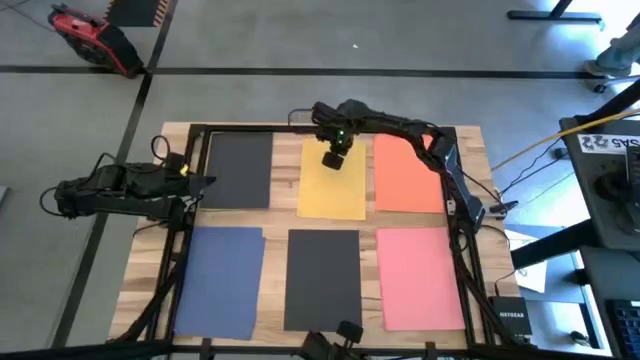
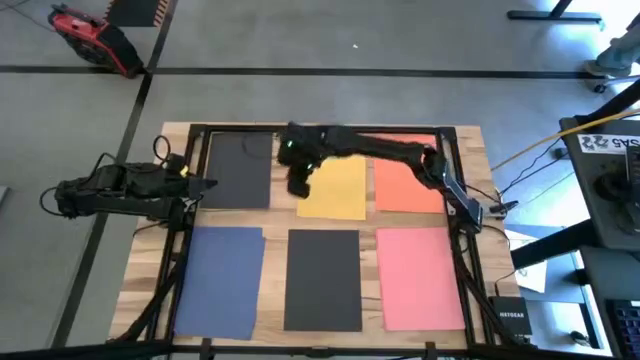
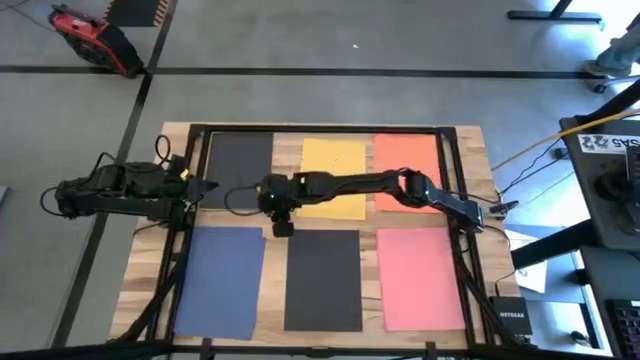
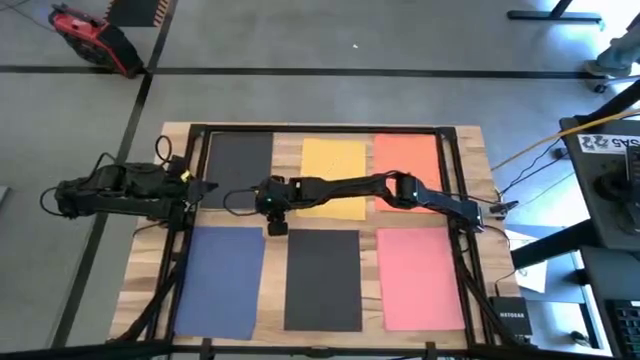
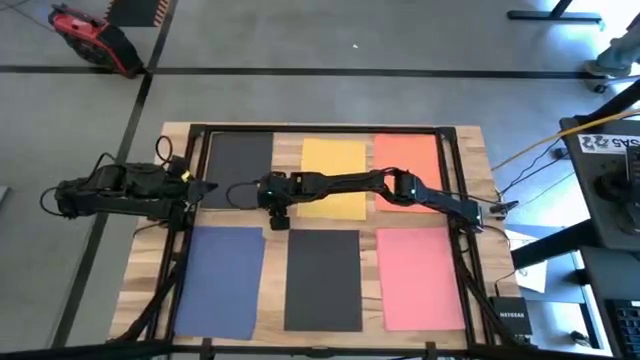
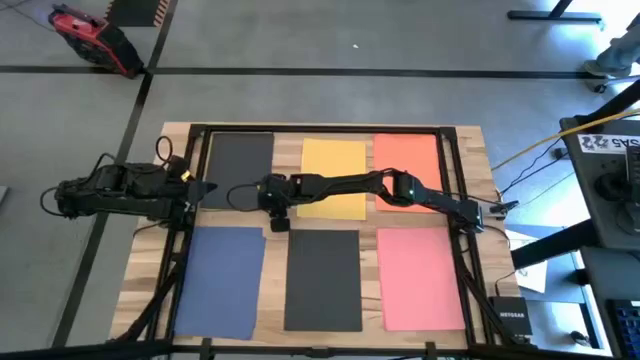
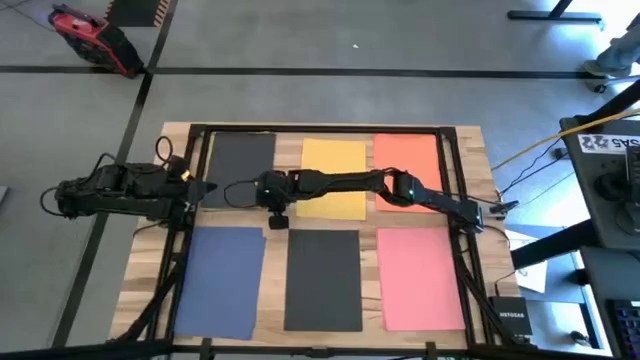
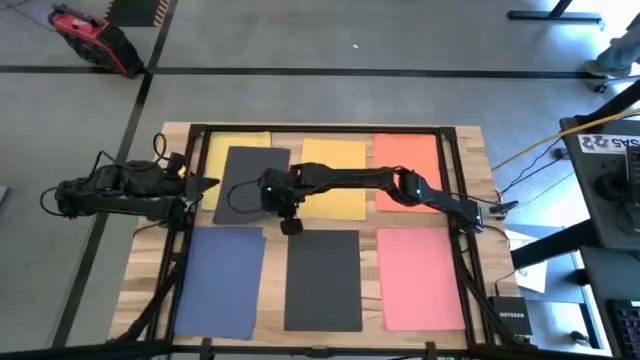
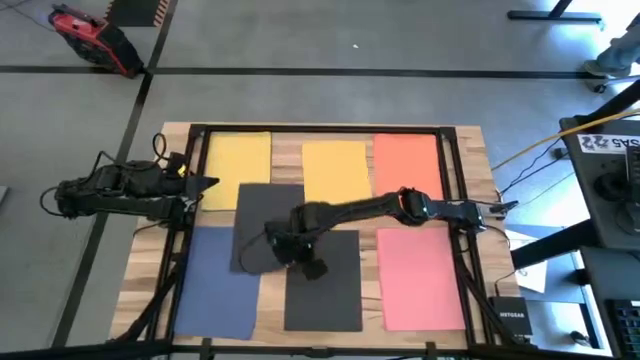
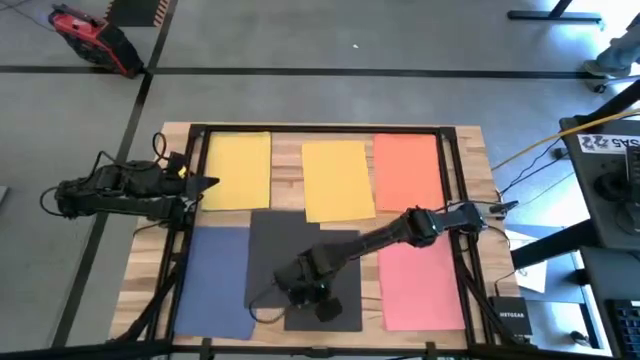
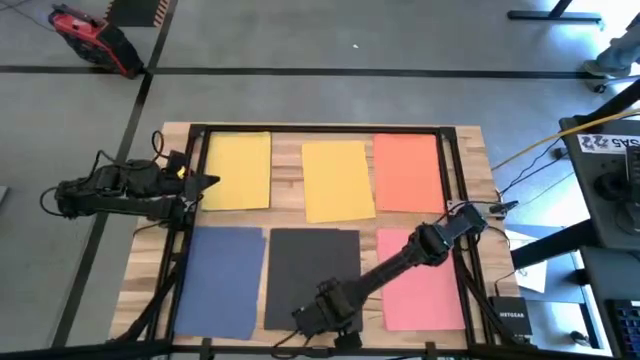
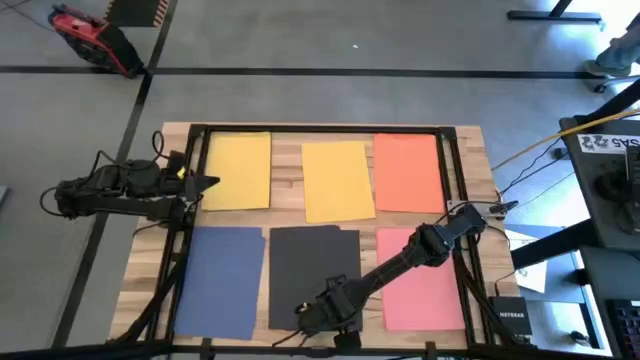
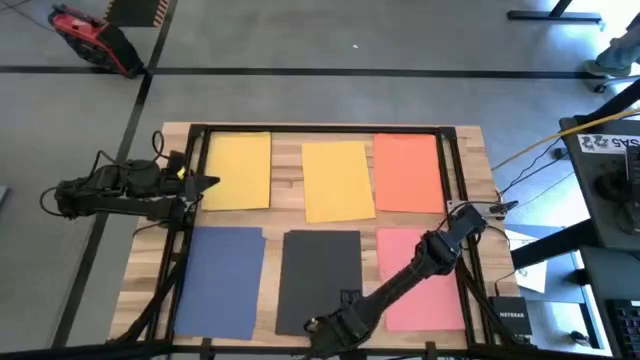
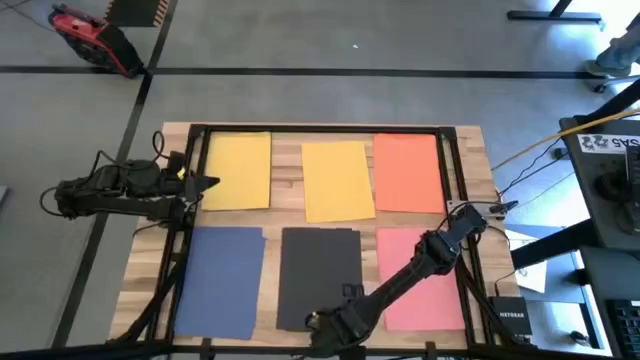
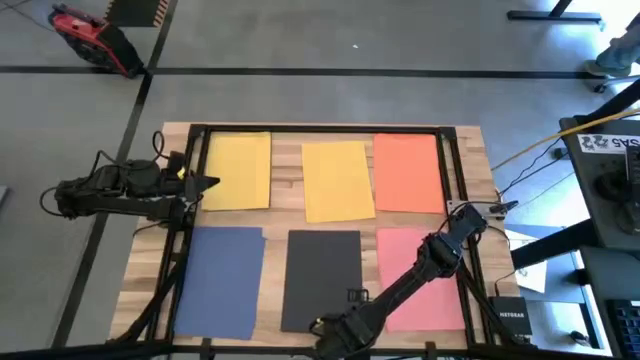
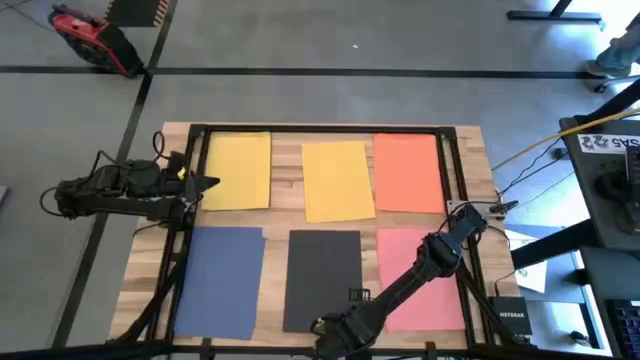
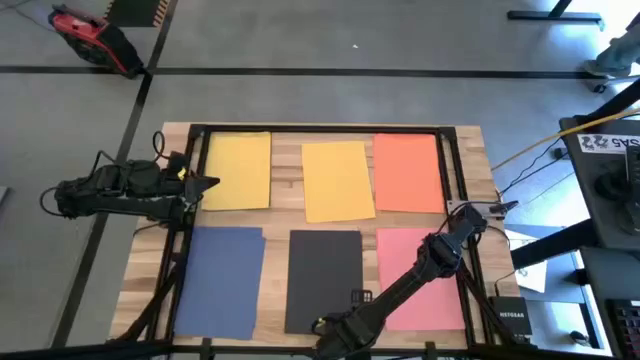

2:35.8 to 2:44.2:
Task: Organize paper
Stack the black colored paper on top of the black colored paper

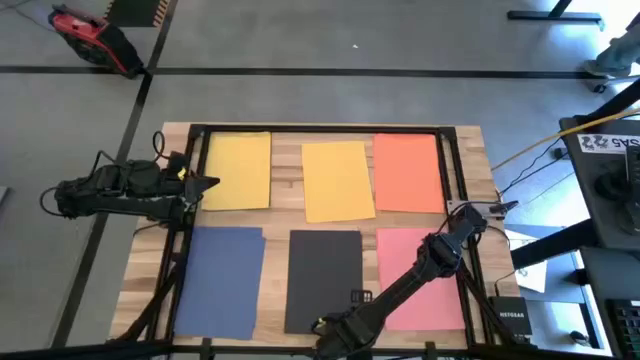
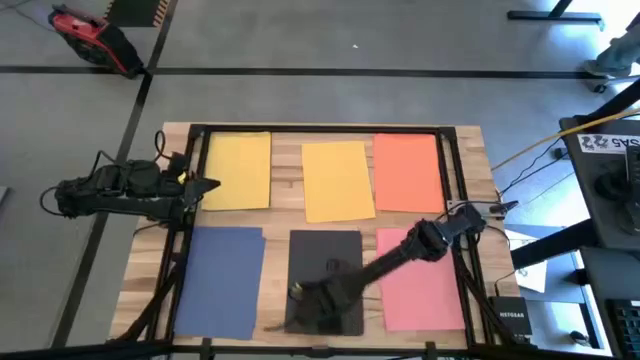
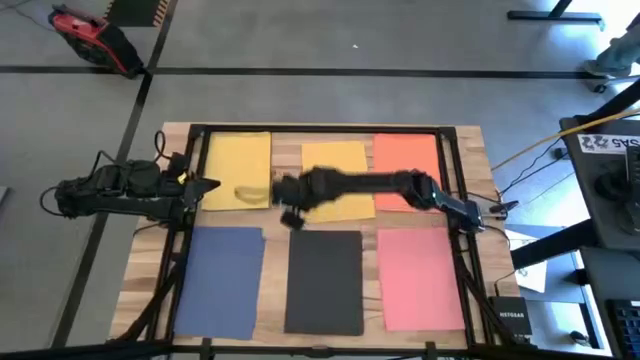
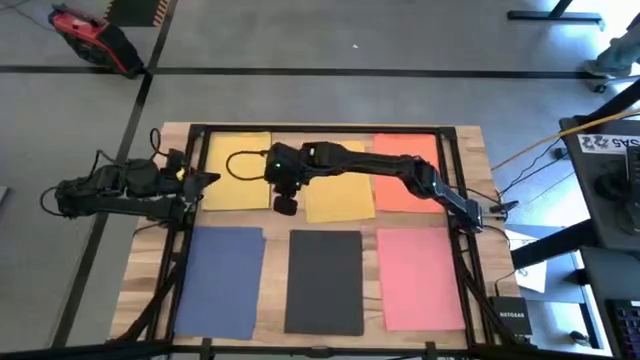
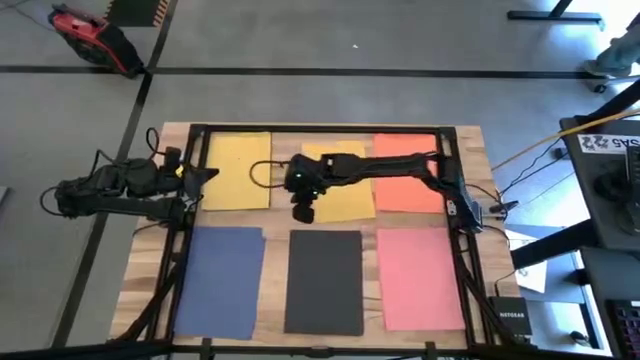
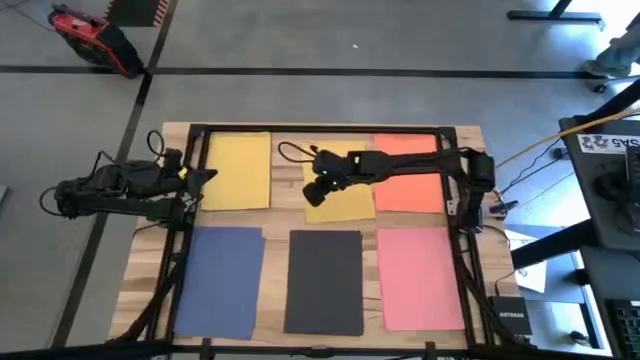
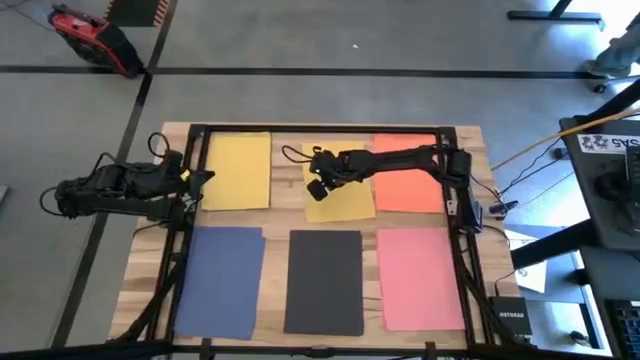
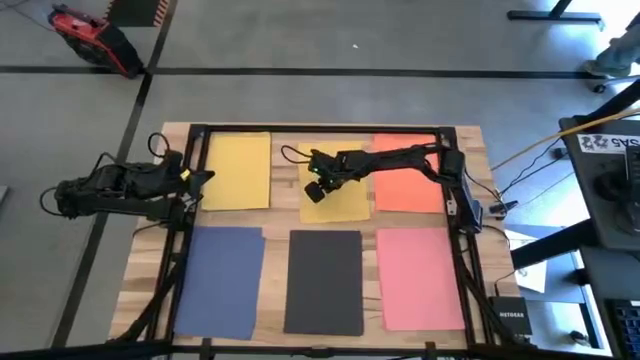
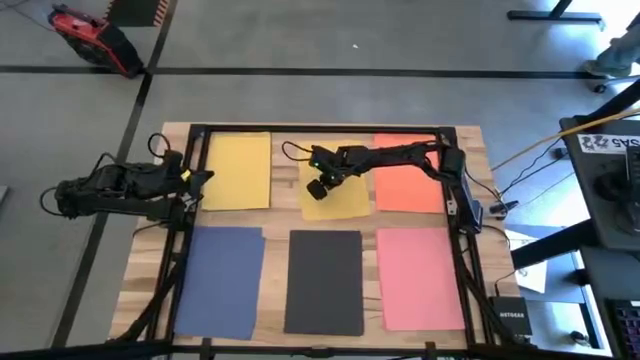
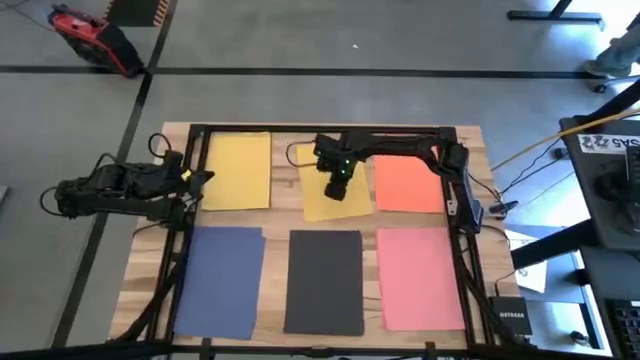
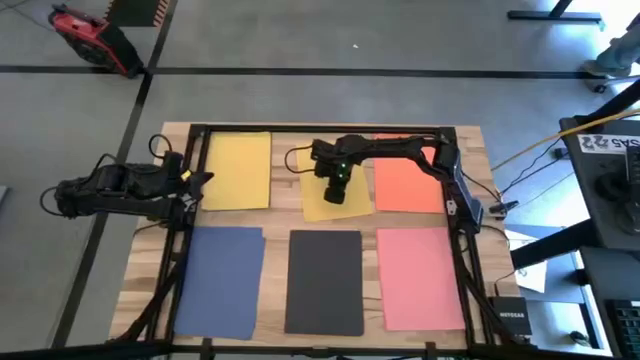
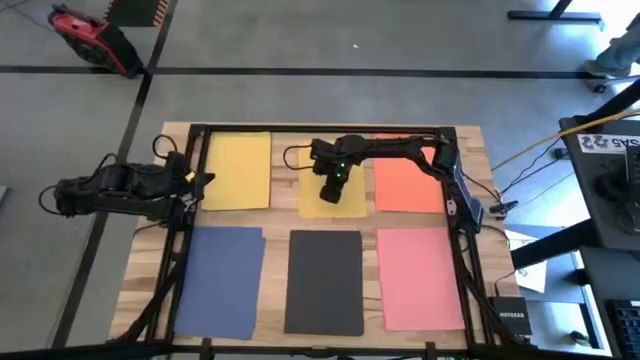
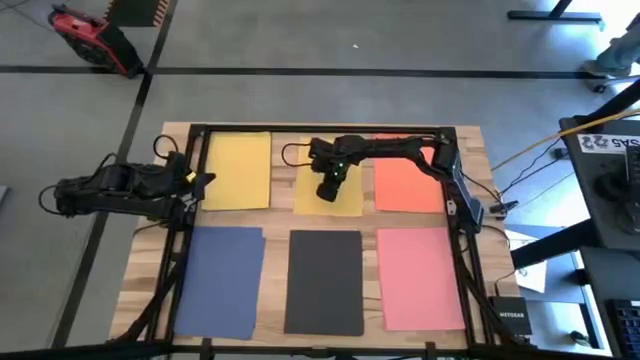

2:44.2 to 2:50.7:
Adjust the top center yellow colored paper

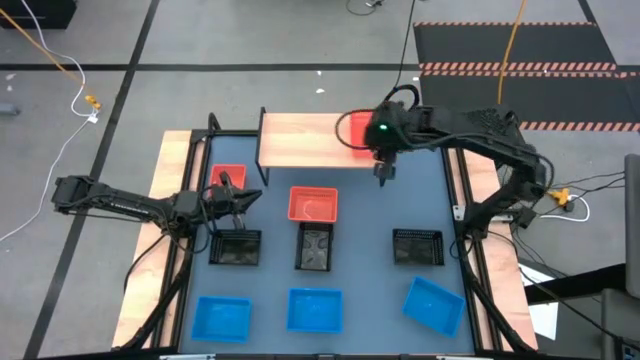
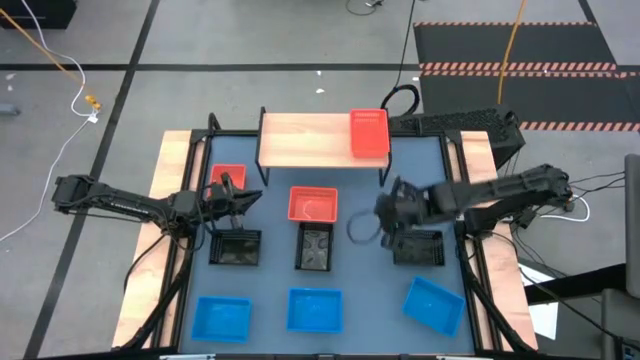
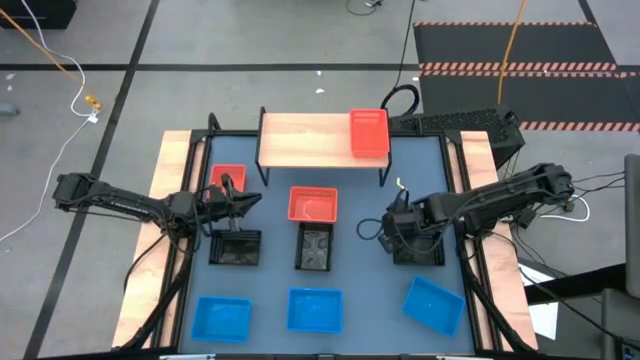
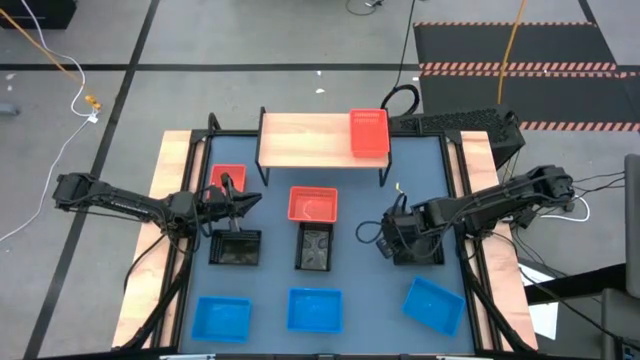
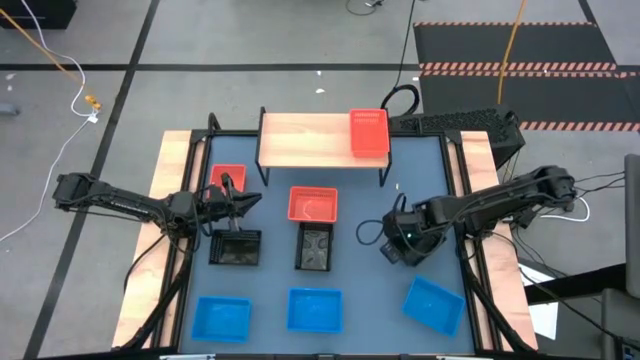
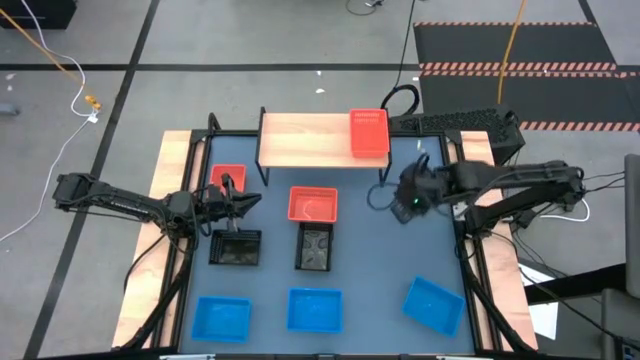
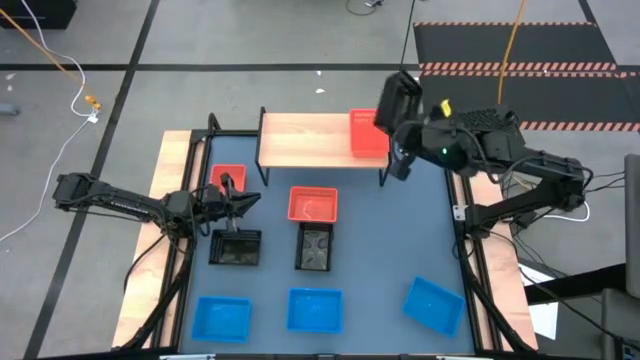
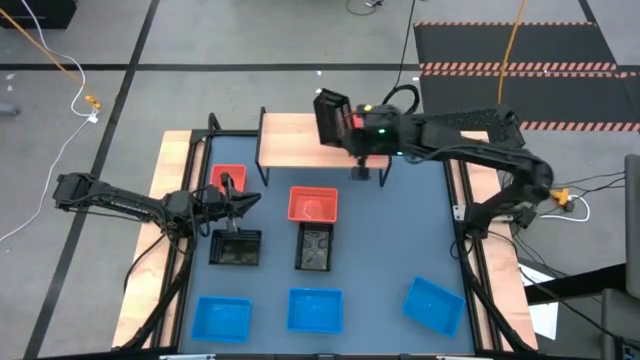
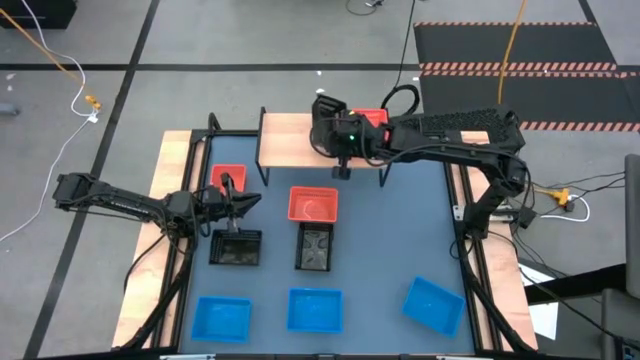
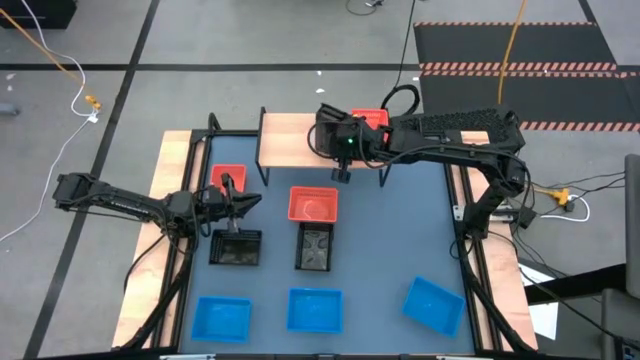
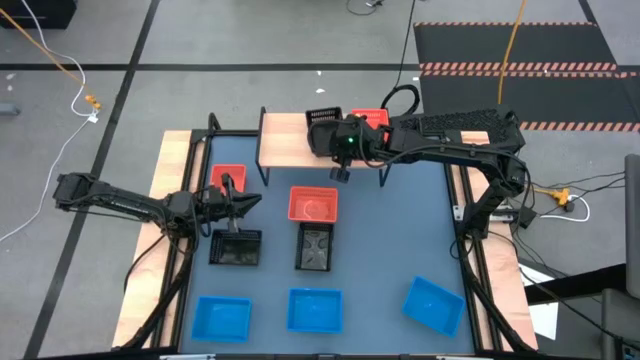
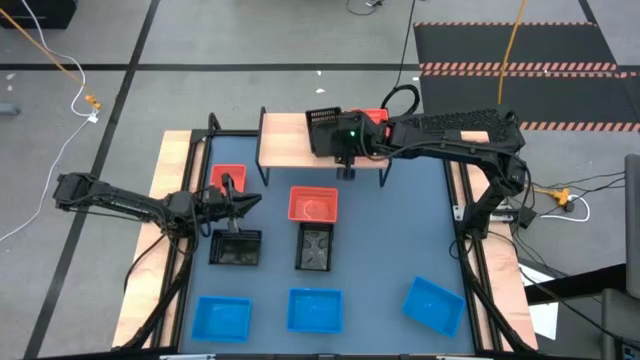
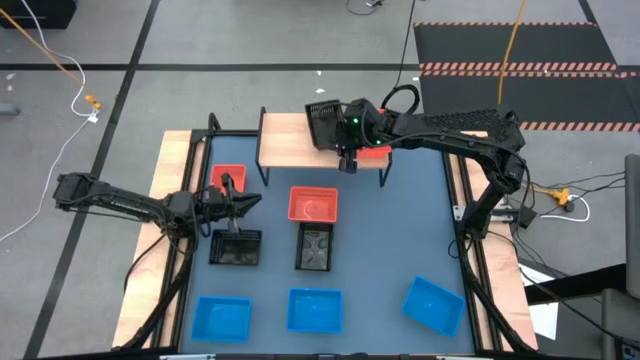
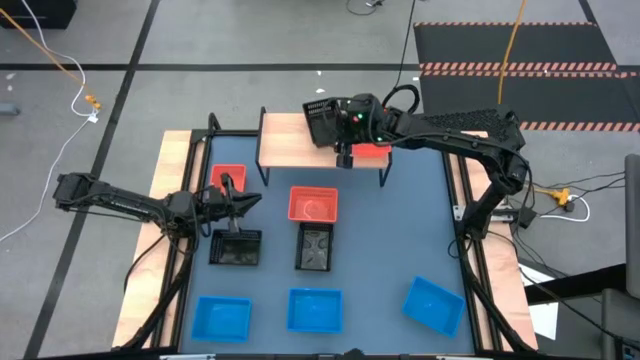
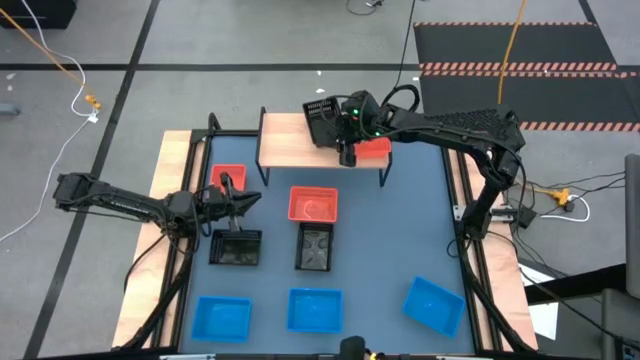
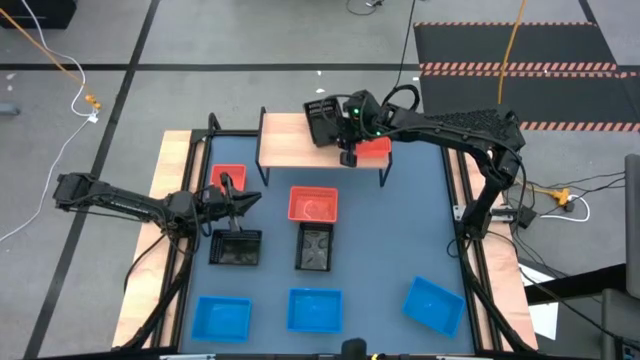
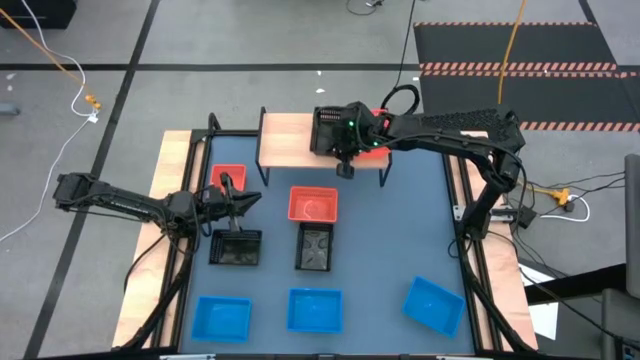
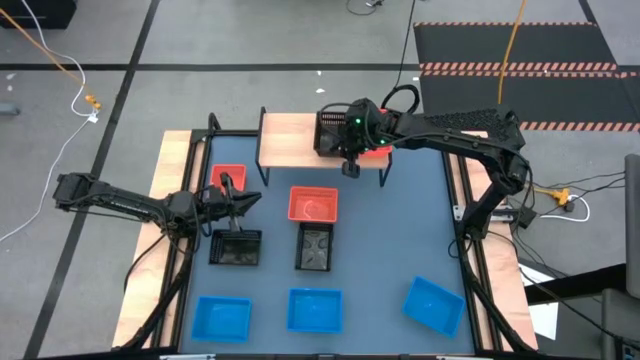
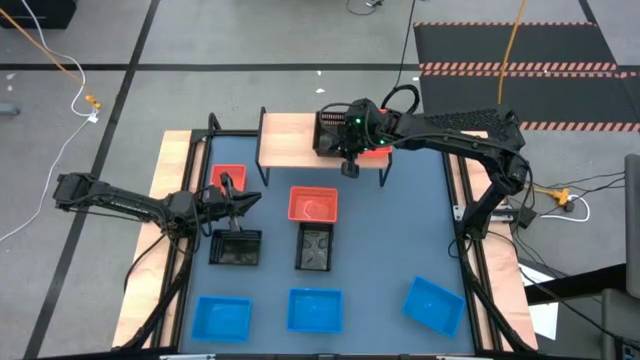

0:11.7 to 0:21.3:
Task: Stack baskets on shelf by color
Put the right black bin on the shelf
